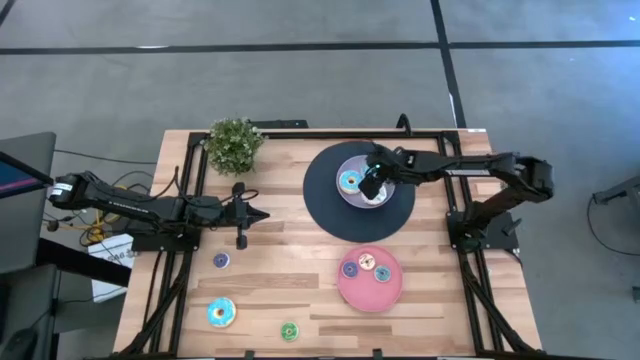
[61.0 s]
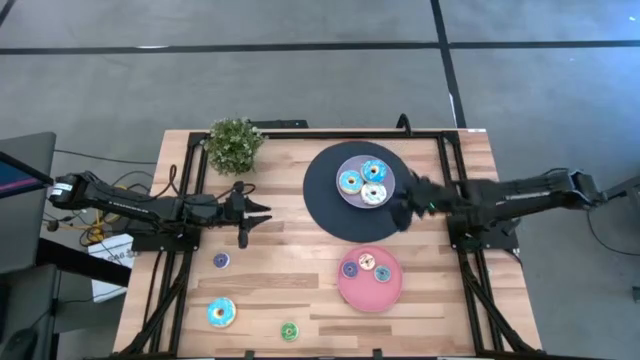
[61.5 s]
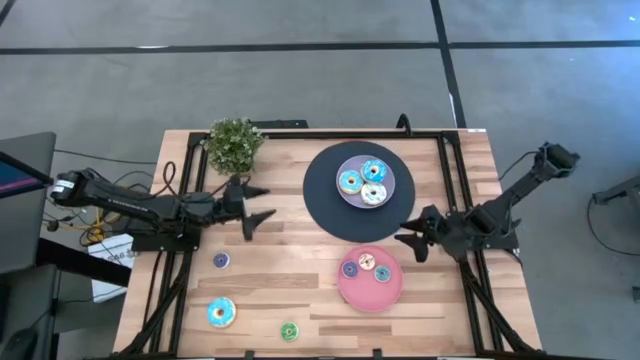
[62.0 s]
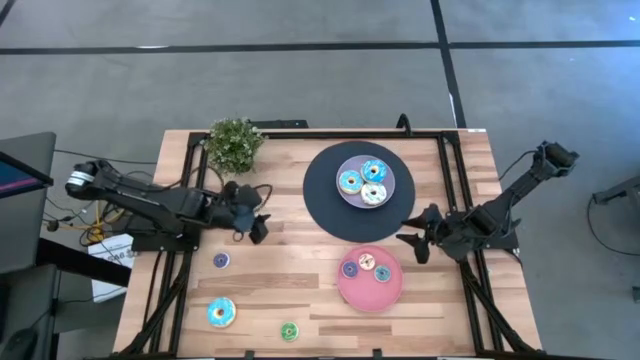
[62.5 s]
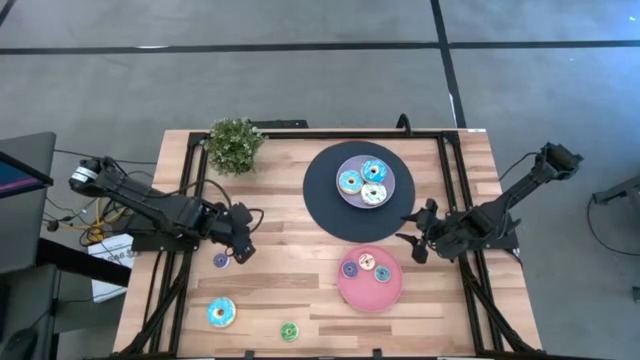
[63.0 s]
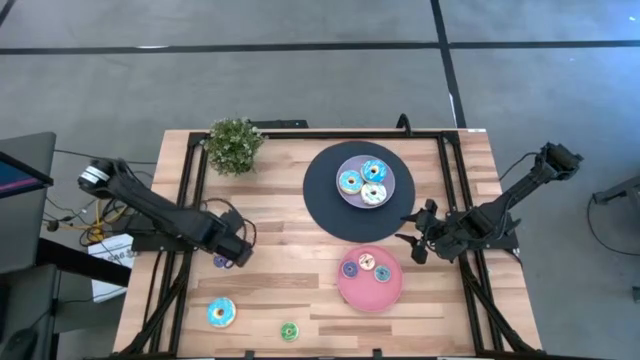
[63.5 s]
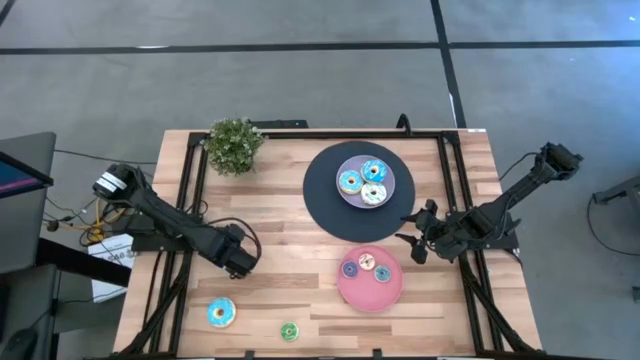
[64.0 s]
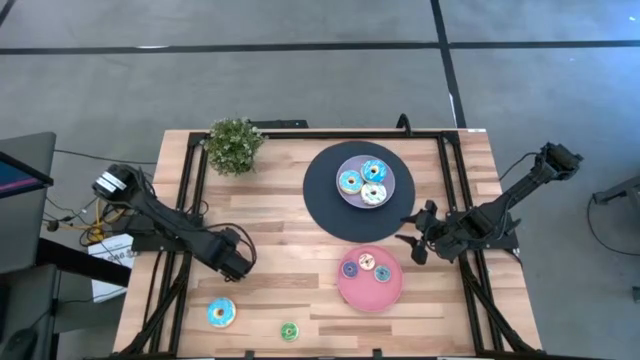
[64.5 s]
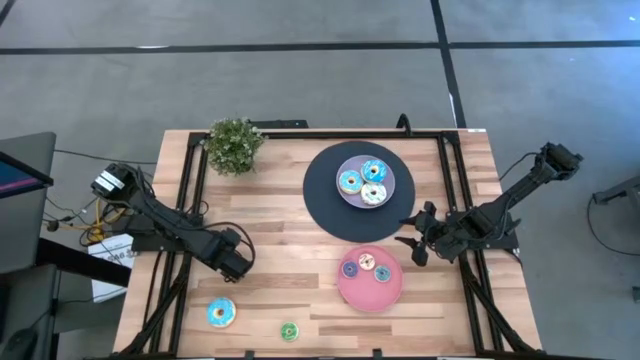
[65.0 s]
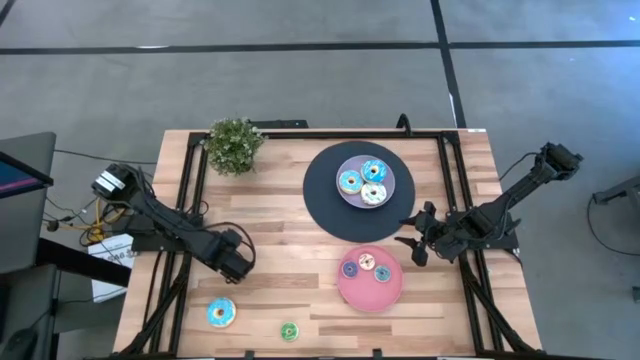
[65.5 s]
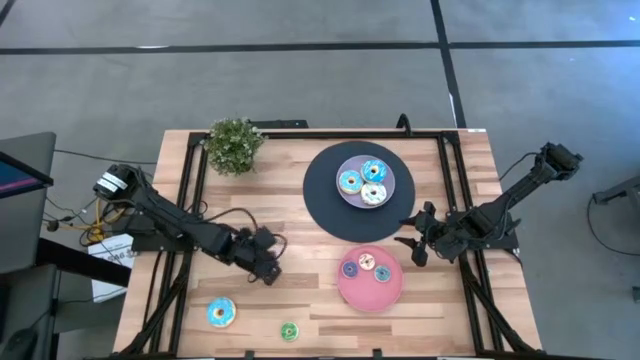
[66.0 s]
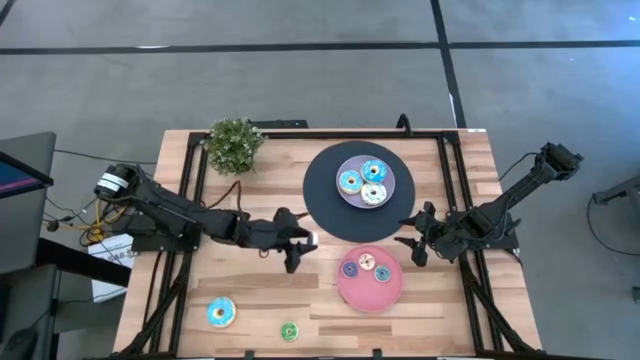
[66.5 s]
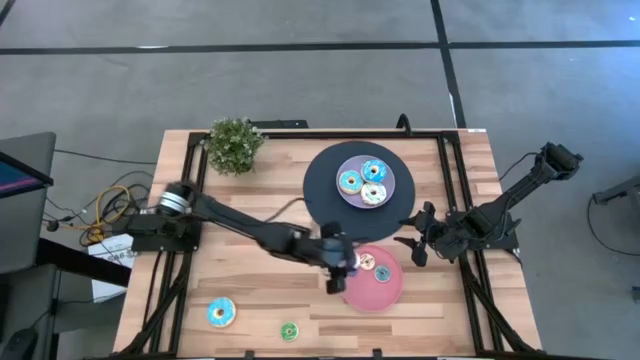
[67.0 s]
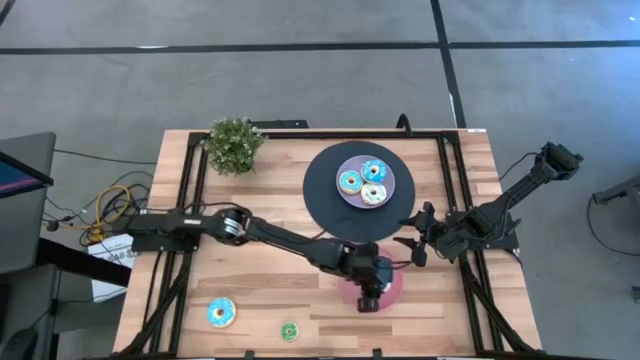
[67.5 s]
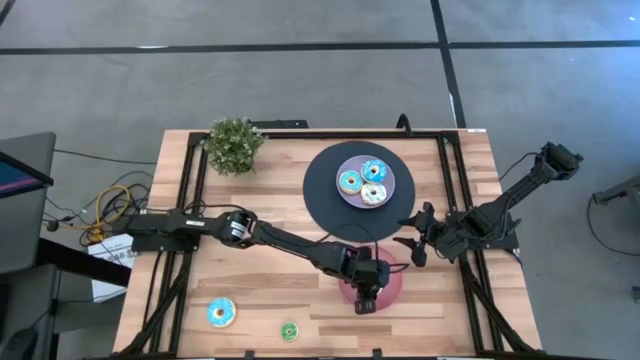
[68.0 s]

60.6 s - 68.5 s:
Task: Pick & Place donuts
Put the small purple donut into the pink plate

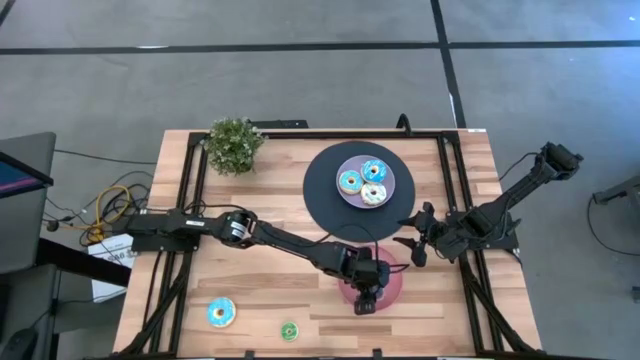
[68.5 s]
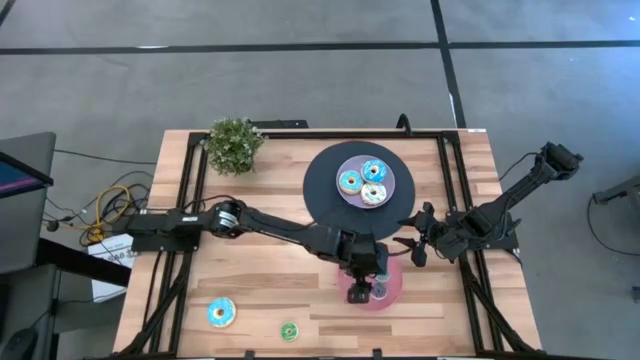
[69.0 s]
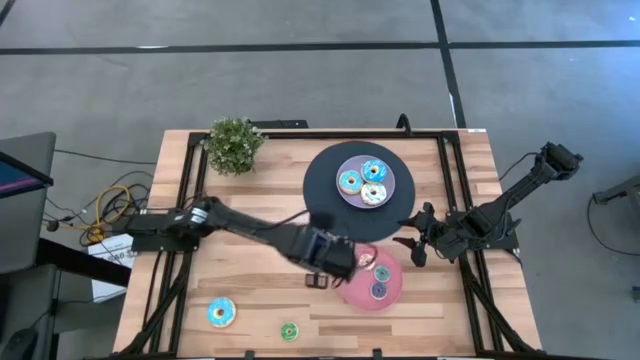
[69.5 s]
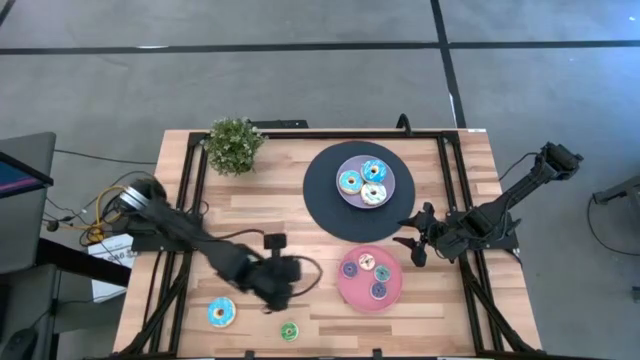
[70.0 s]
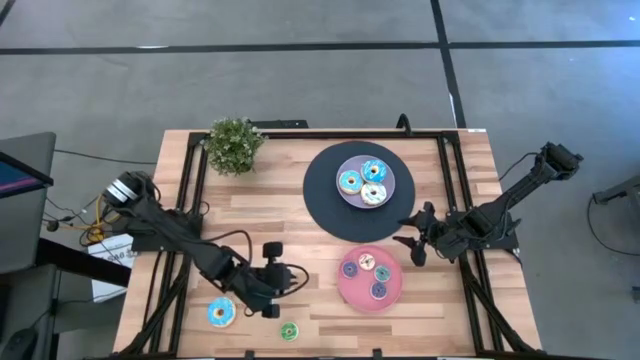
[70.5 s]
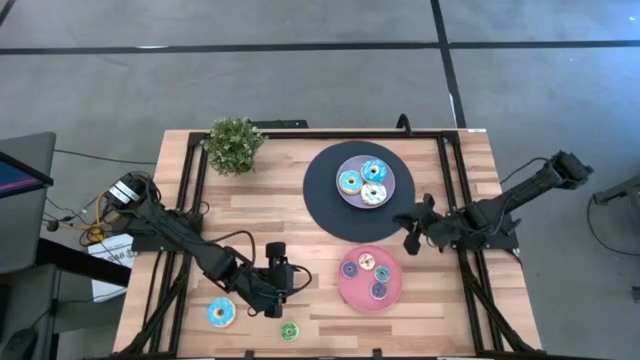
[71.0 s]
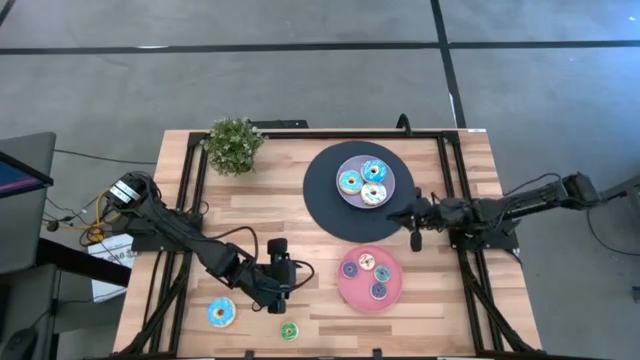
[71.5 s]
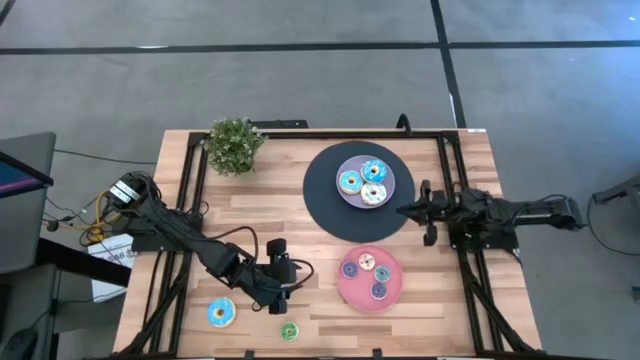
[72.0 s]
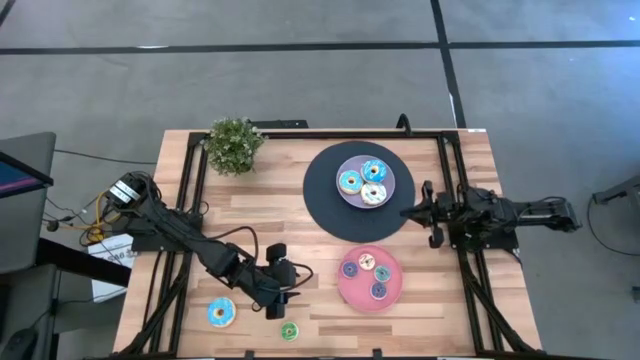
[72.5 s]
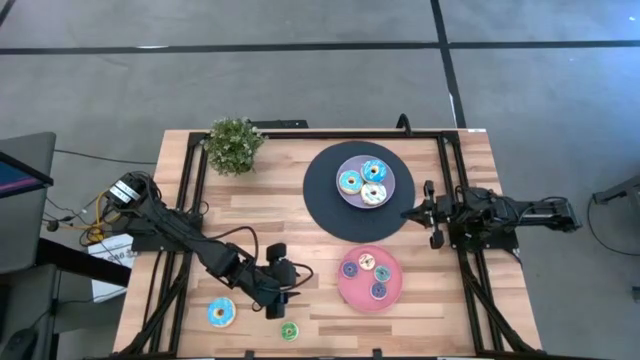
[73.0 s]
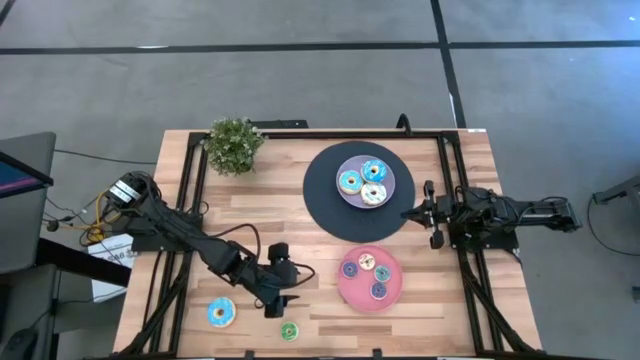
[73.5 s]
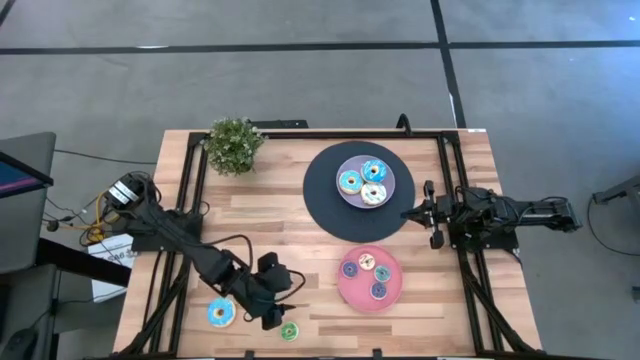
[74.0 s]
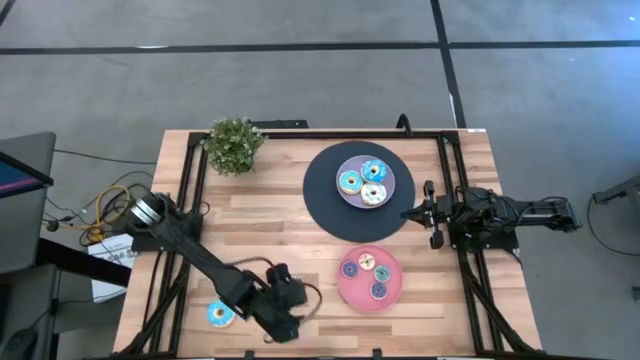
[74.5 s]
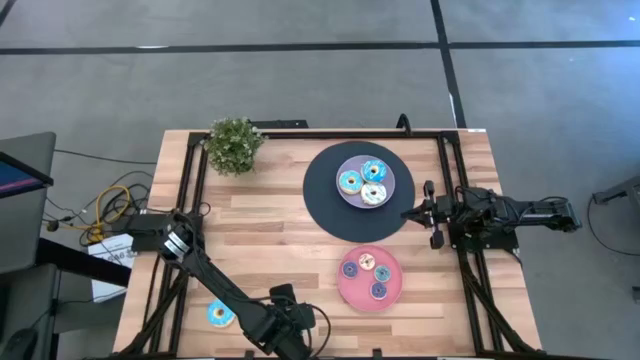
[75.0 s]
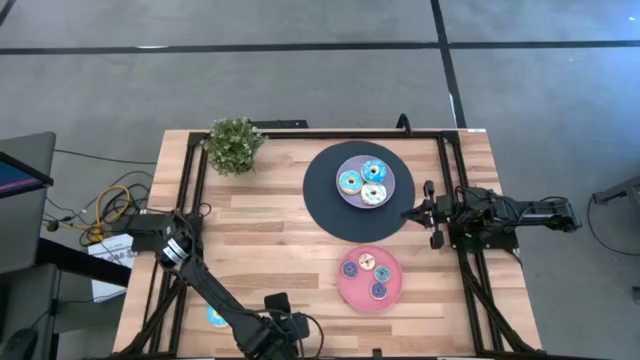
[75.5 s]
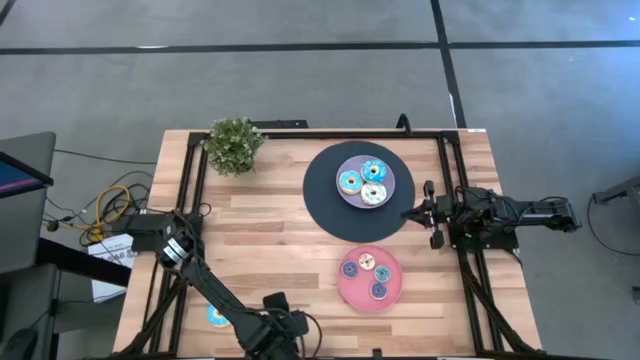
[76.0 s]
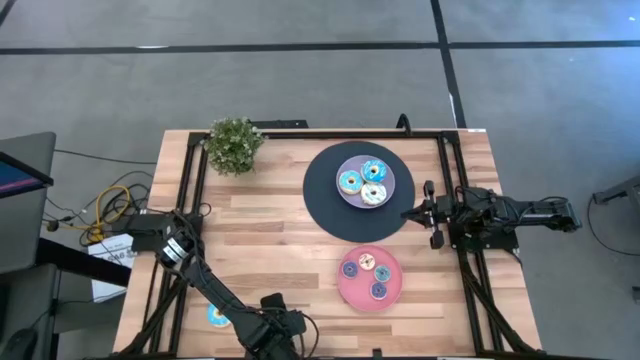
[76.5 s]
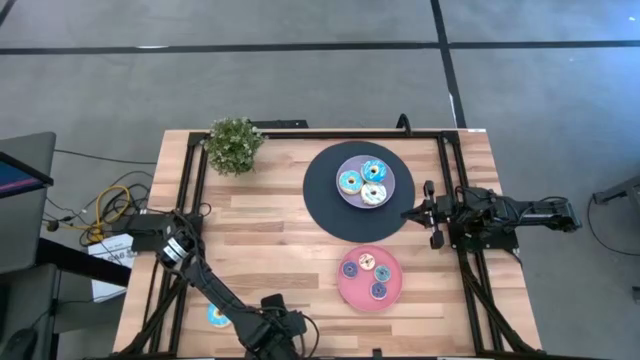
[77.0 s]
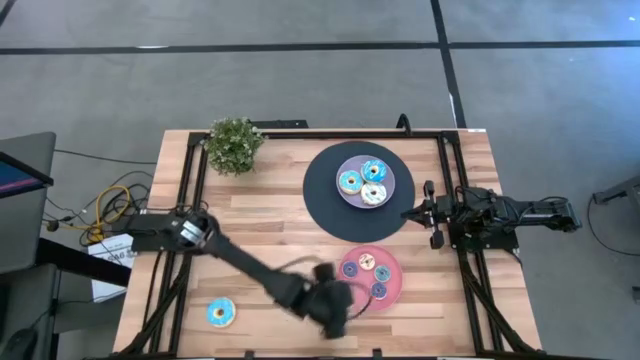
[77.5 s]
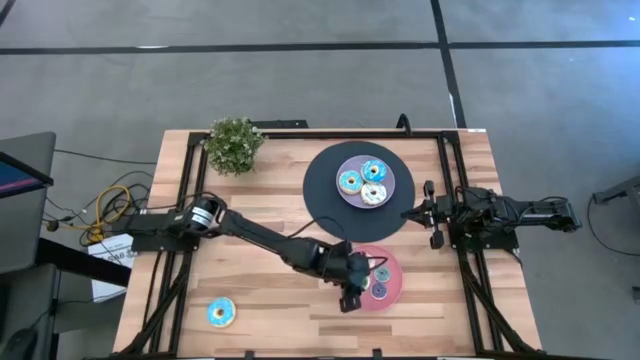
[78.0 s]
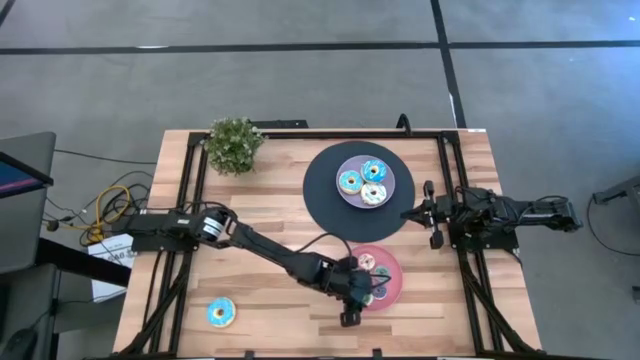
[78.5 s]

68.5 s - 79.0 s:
Put the small green donut into the pink plate

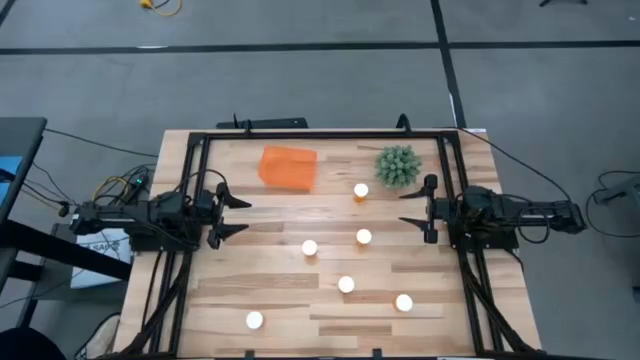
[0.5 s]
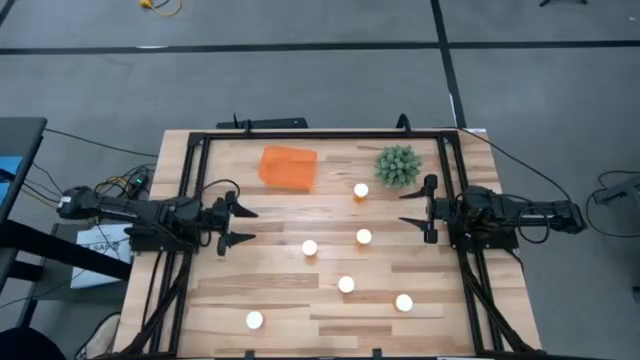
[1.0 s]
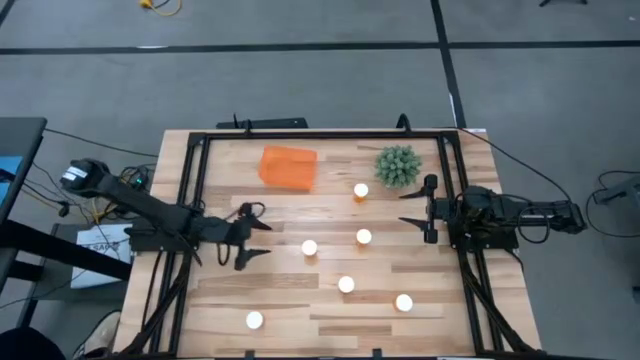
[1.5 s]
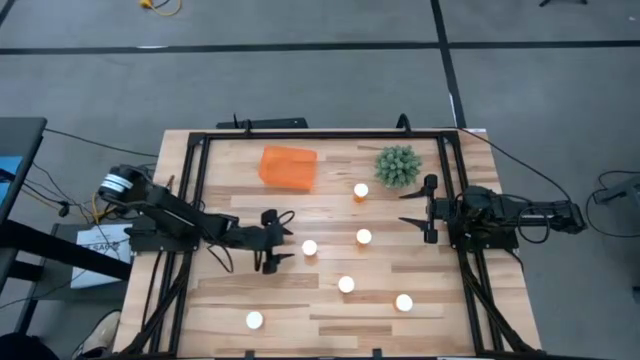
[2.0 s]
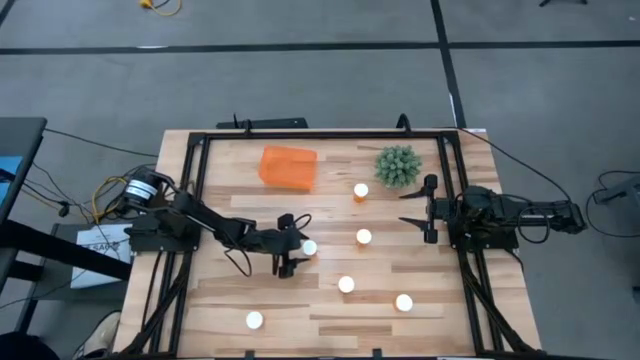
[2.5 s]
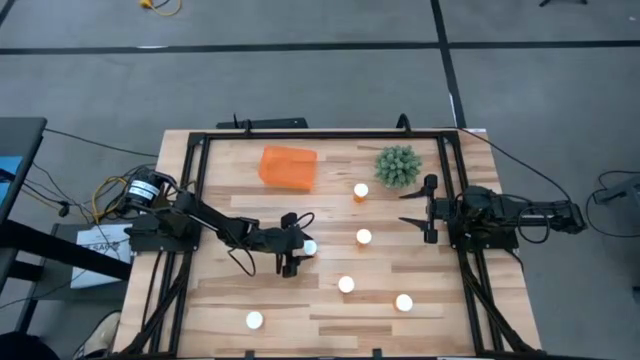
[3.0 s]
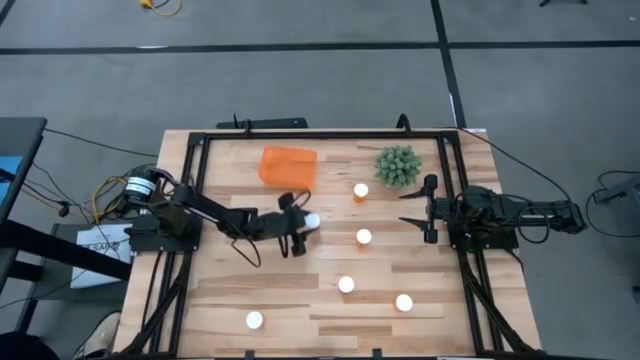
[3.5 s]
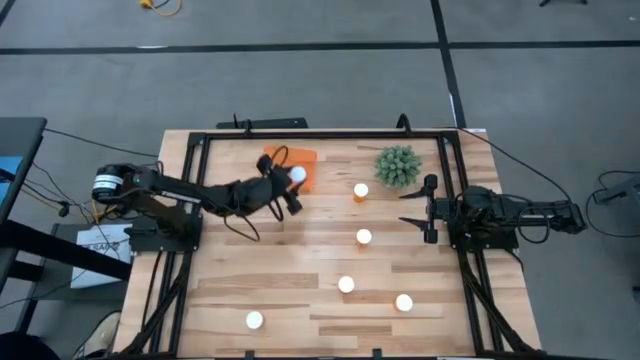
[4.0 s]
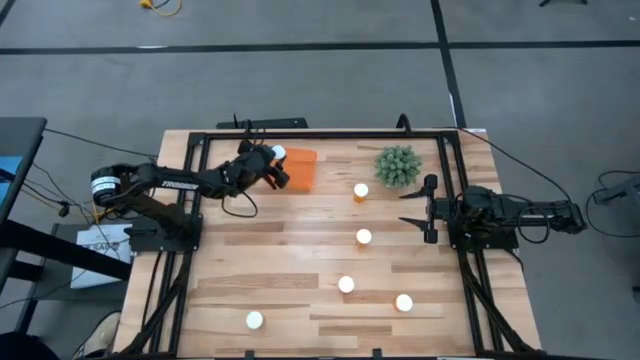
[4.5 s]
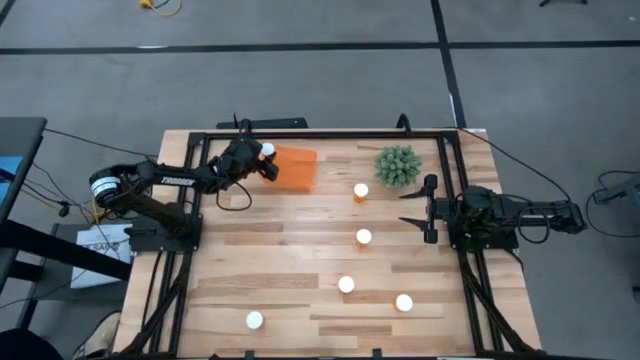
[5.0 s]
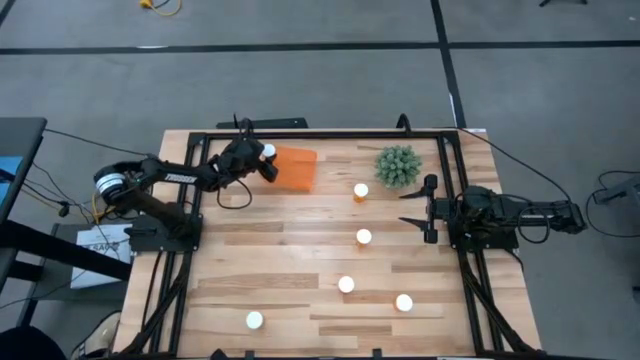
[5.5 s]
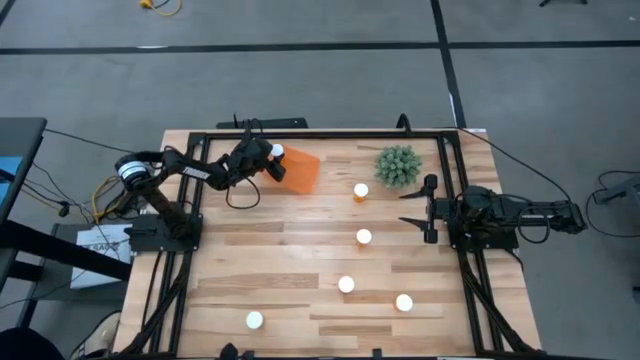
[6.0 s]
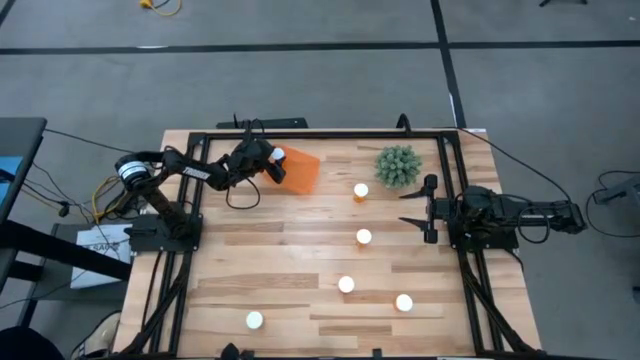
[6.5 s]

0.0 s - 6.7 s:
Task: Pick and place pill bottles into a basket
Put the orange pill bottle into the orange bin
